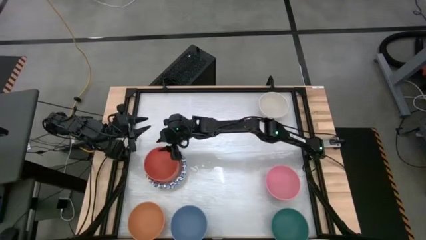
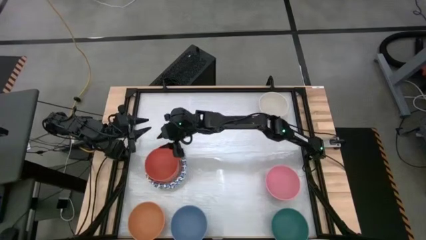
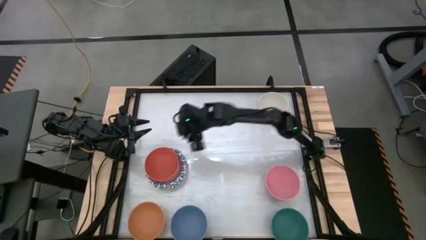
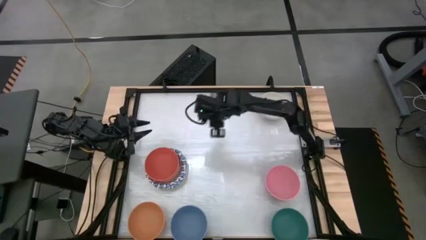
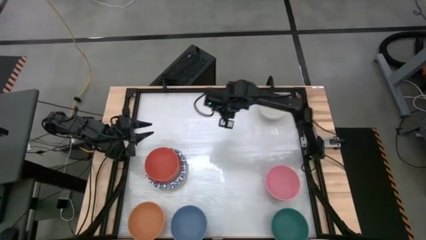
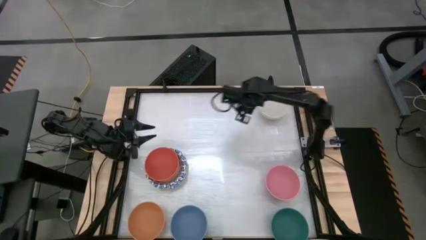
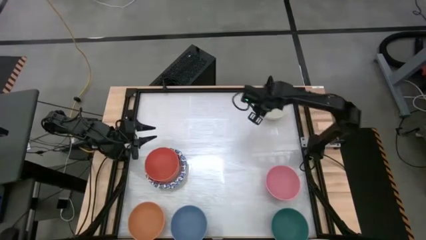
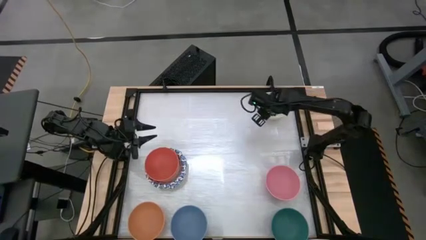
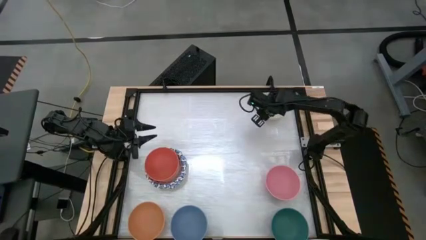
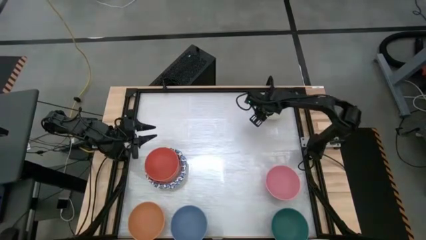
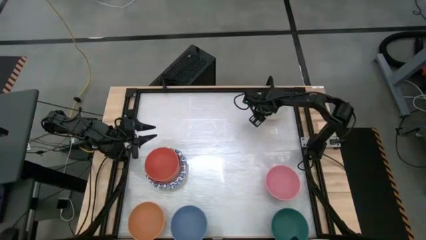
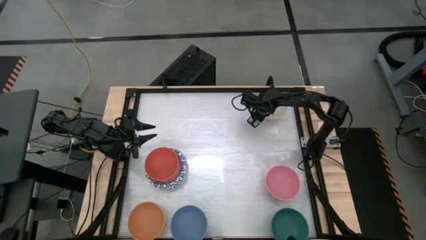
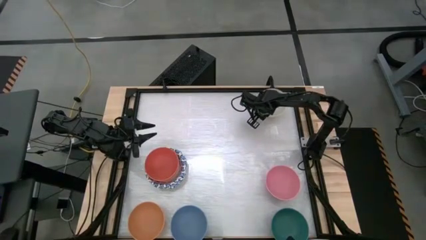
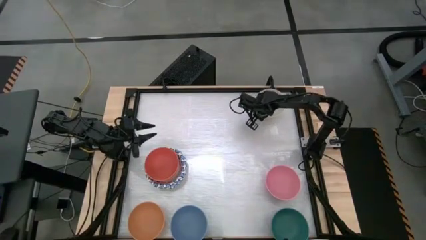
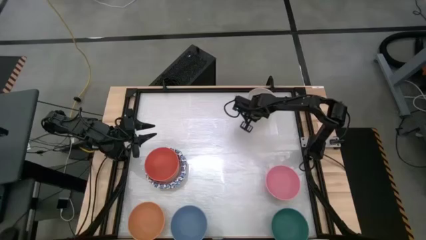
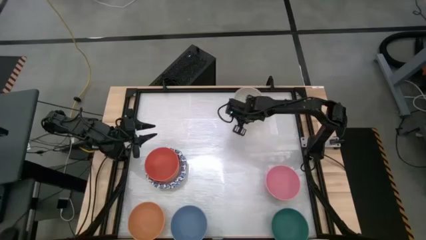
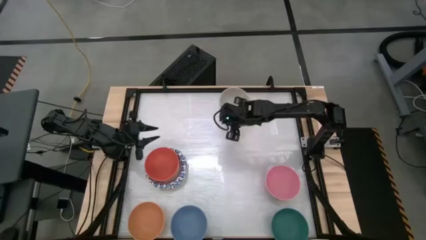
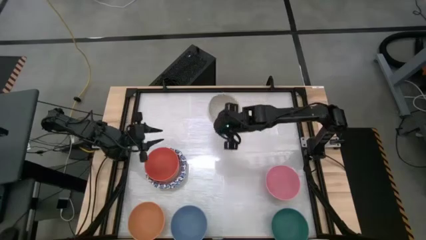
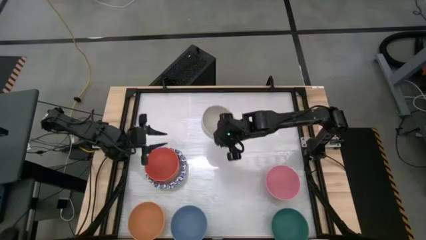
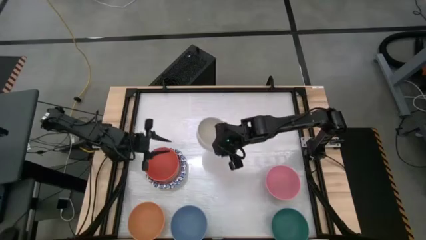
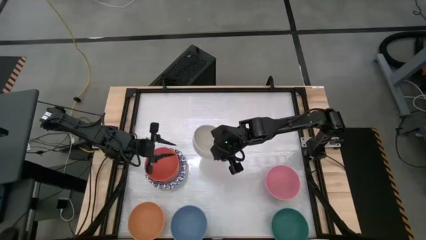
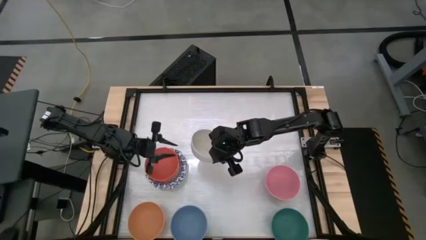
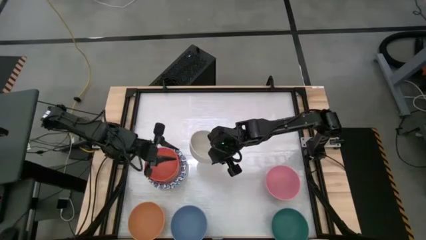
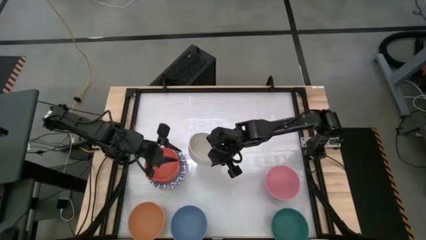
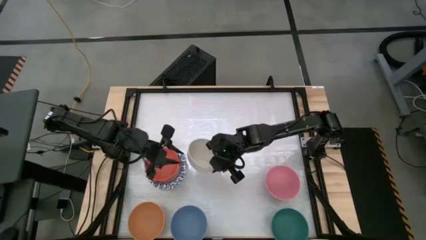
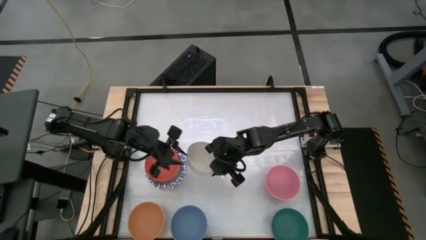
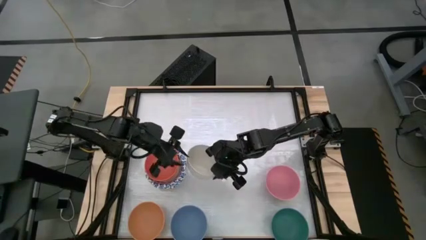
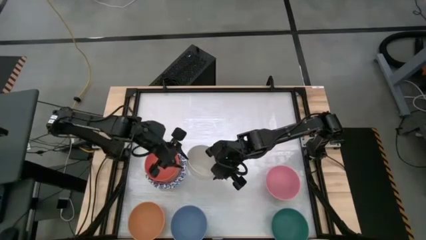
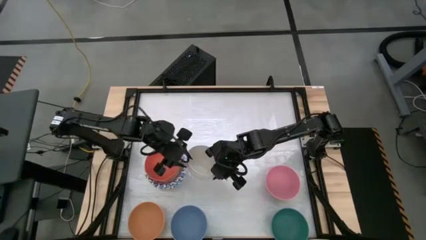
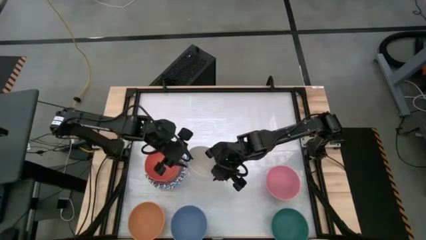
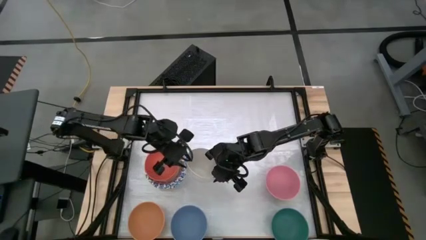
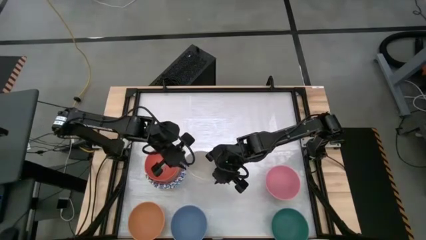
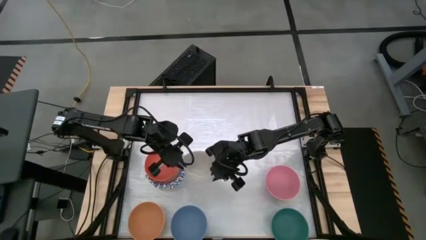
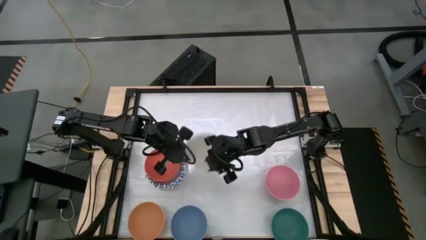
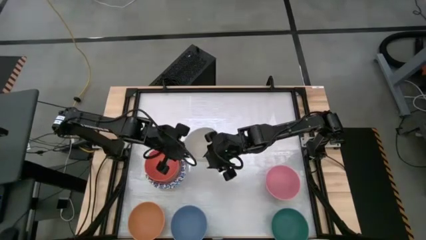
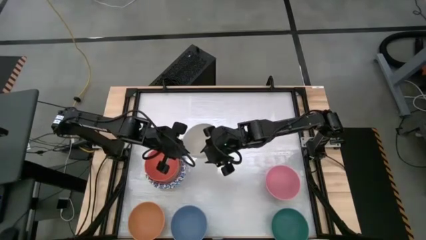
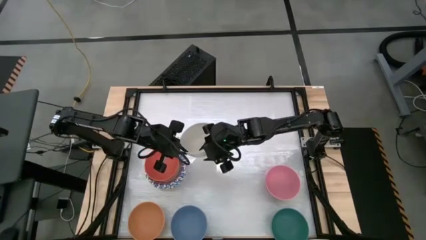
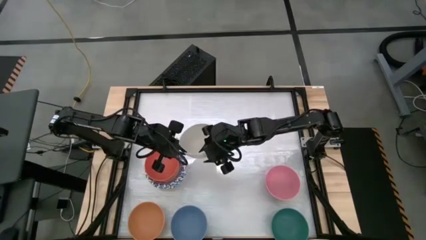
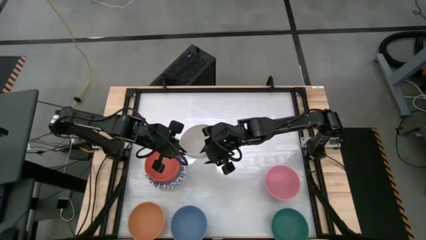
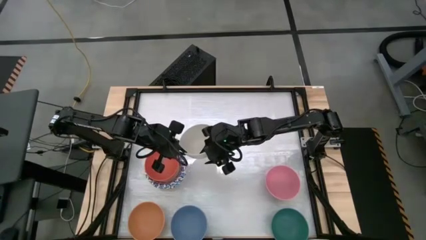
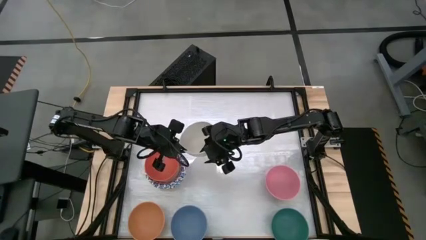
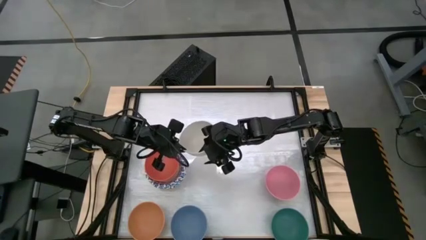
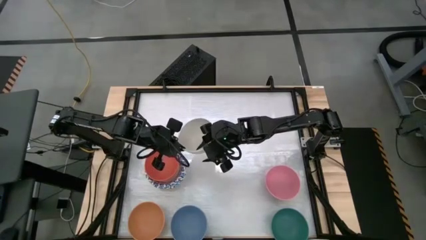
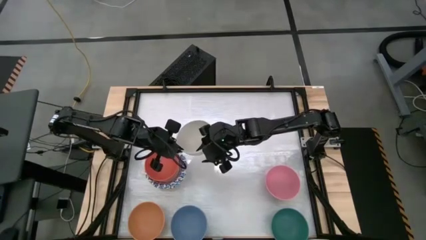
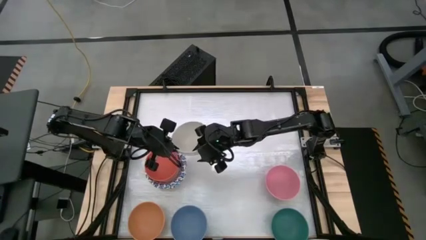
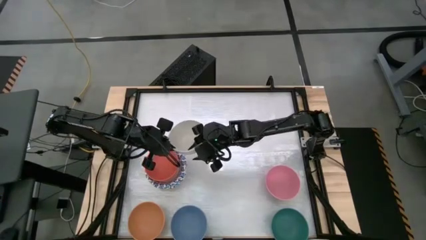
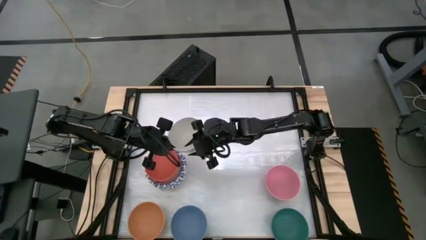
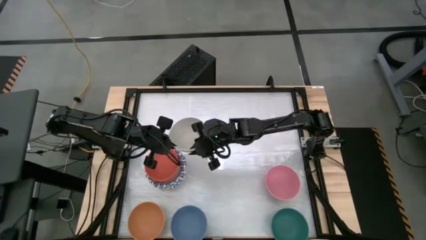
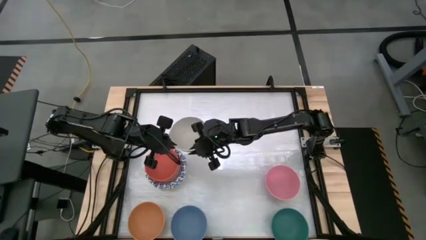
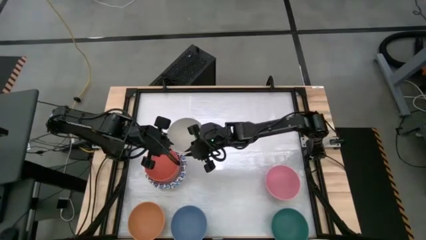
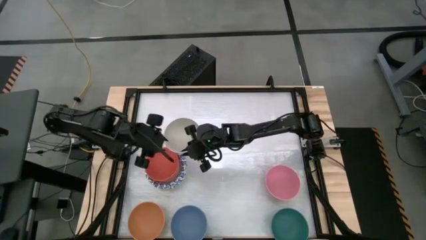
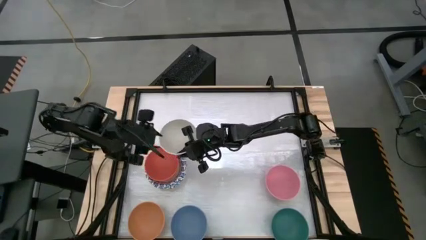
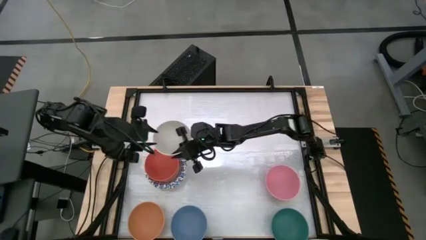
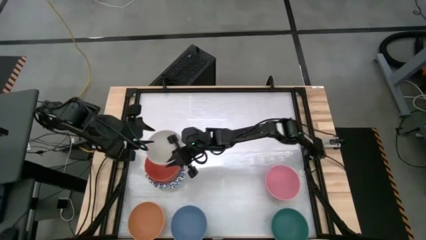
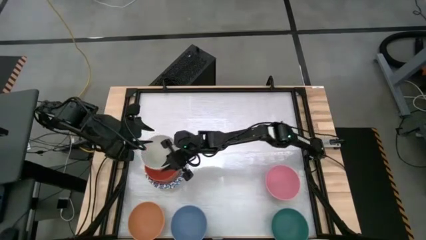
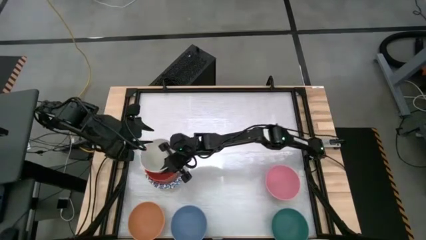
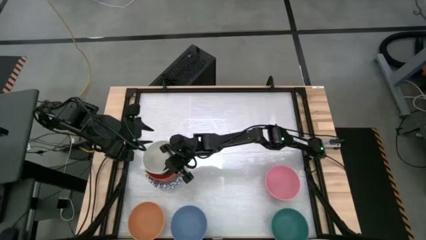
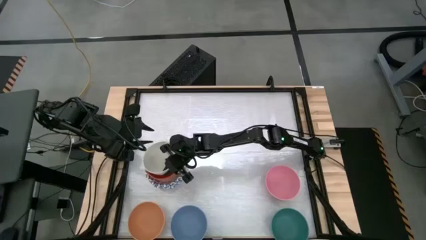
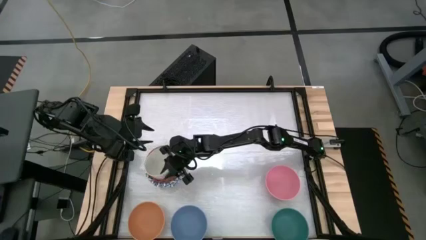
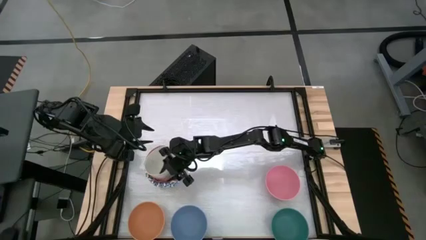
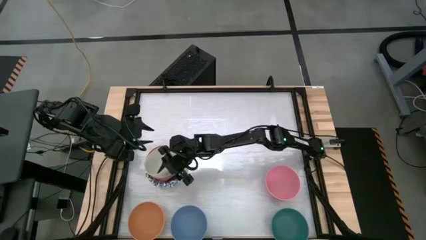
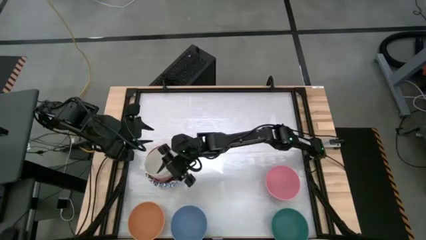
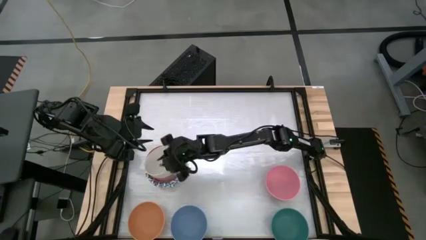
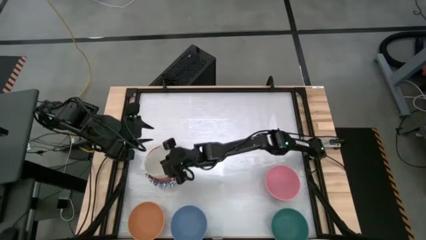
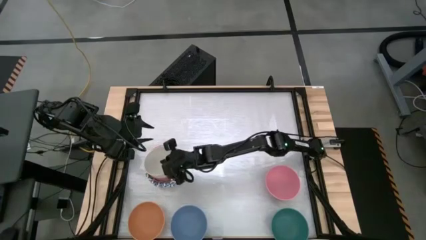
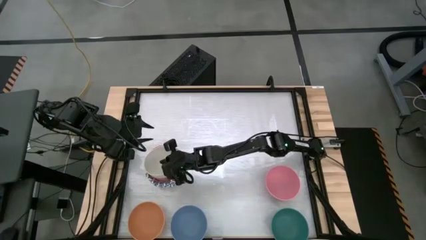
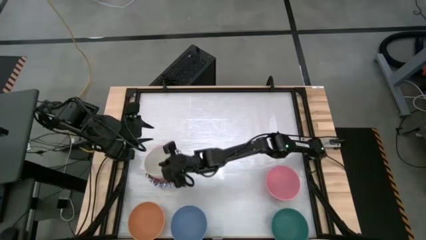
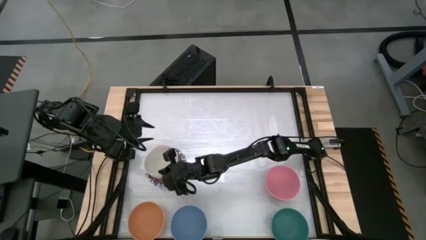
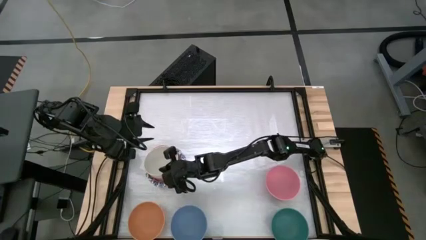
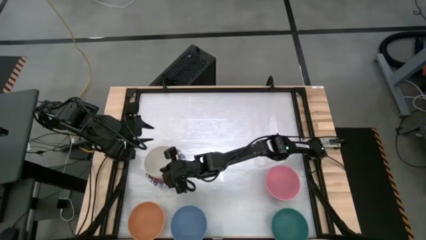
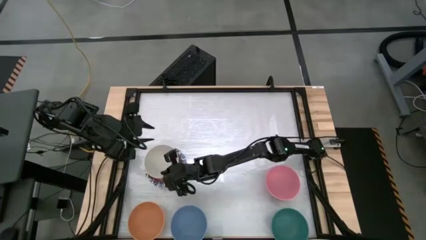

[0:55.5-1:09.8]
Stack the white bowl into the orange bowl
